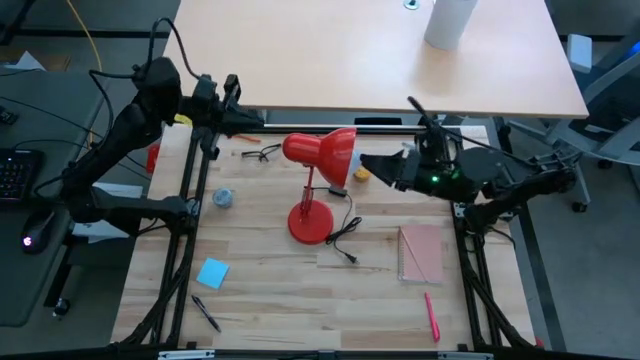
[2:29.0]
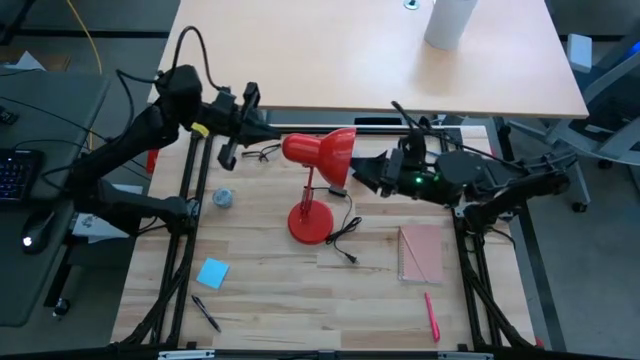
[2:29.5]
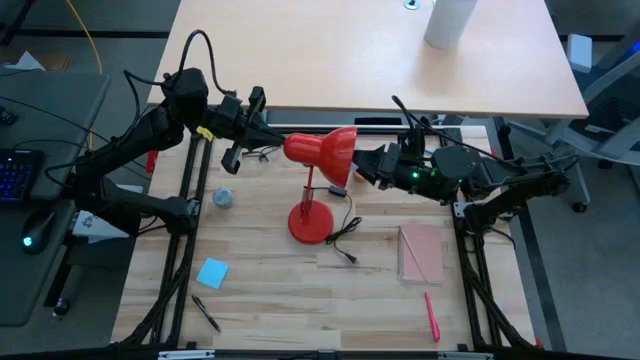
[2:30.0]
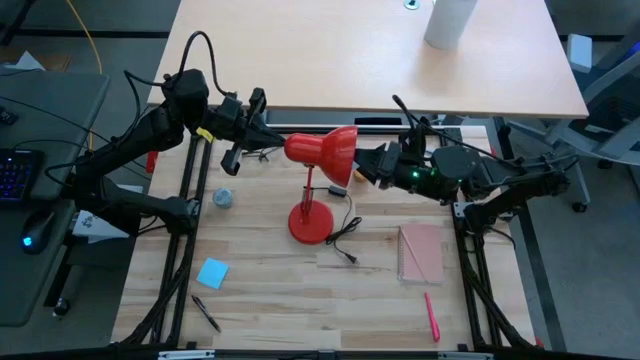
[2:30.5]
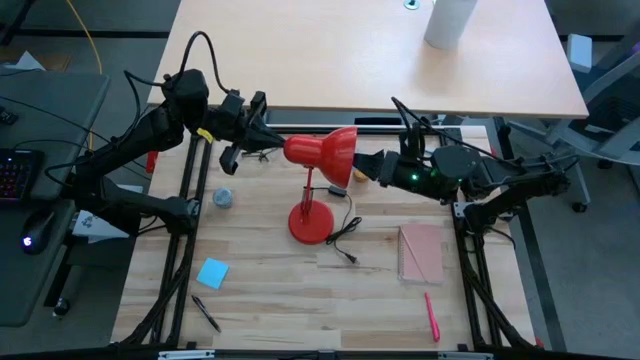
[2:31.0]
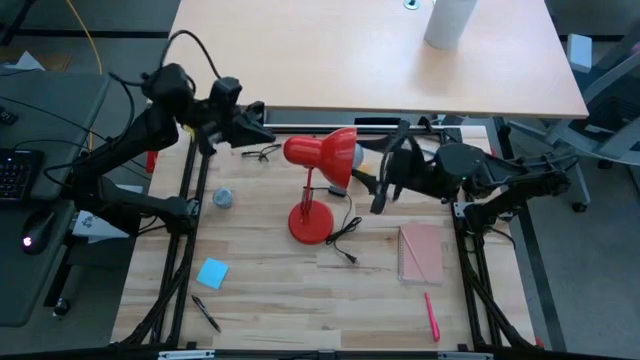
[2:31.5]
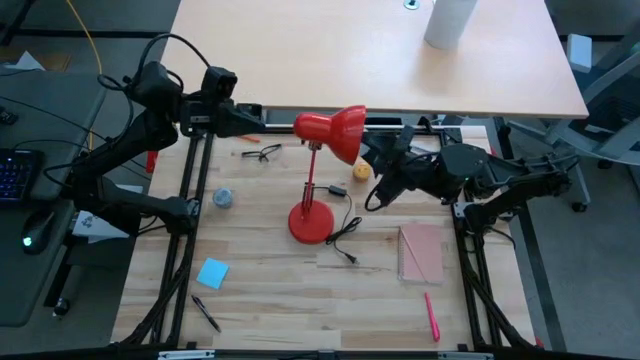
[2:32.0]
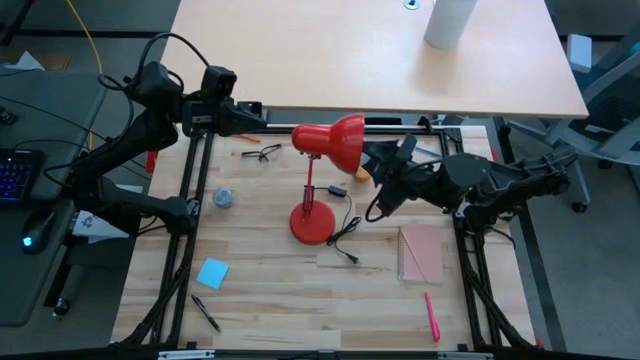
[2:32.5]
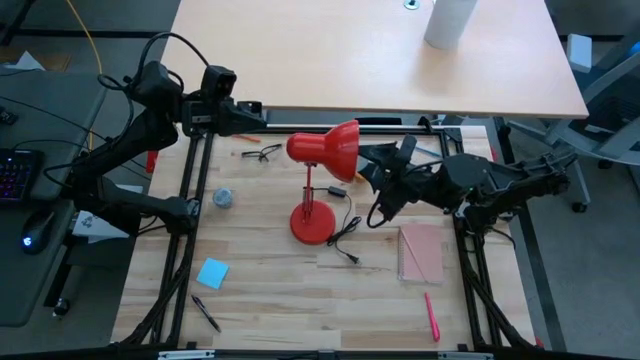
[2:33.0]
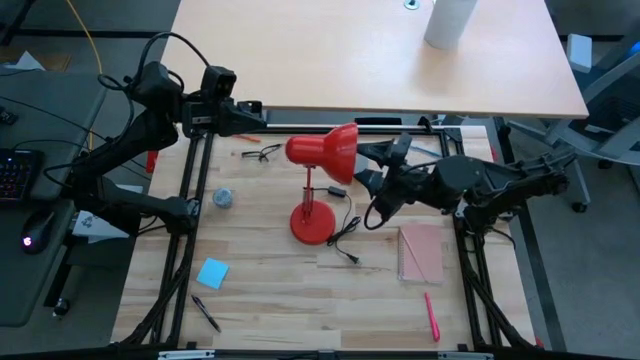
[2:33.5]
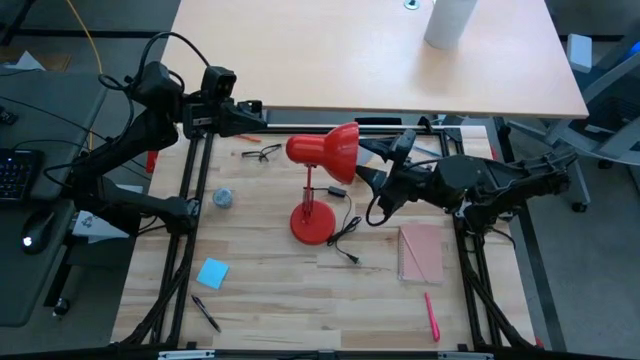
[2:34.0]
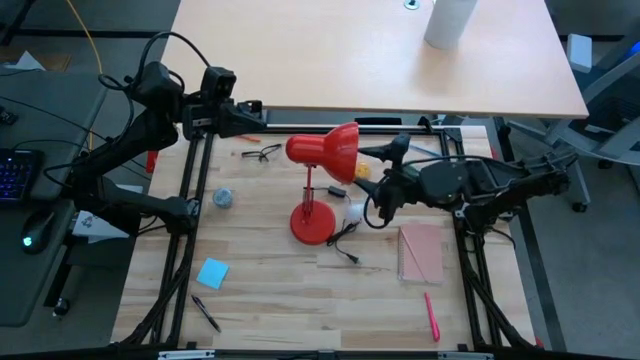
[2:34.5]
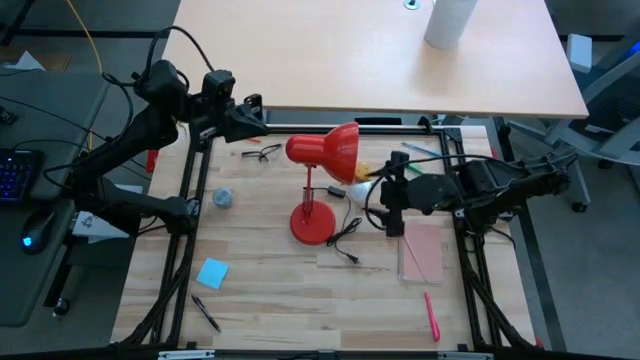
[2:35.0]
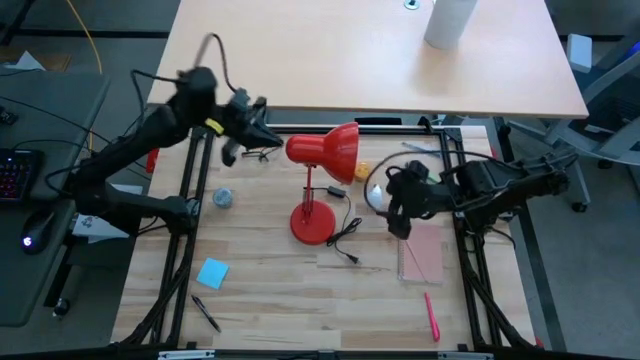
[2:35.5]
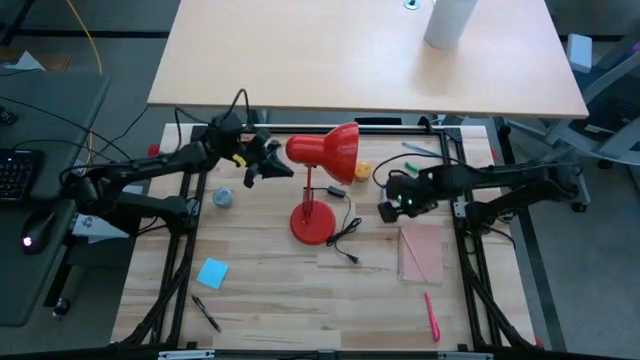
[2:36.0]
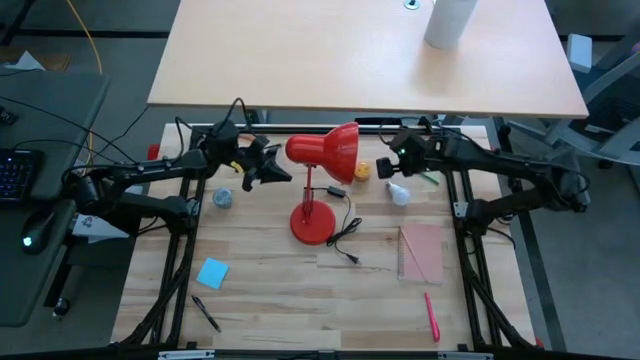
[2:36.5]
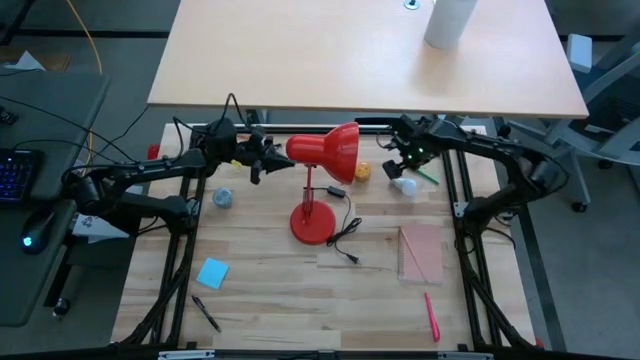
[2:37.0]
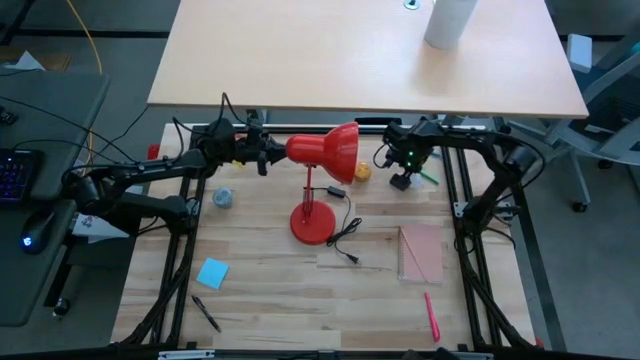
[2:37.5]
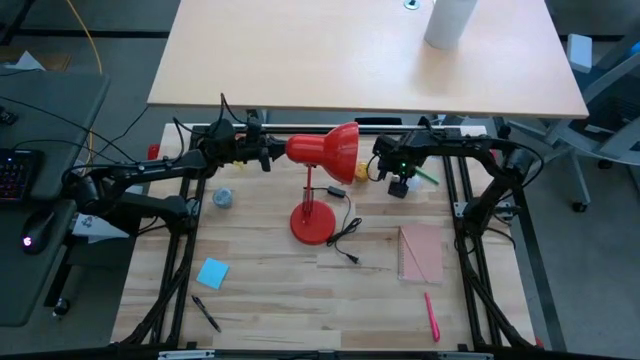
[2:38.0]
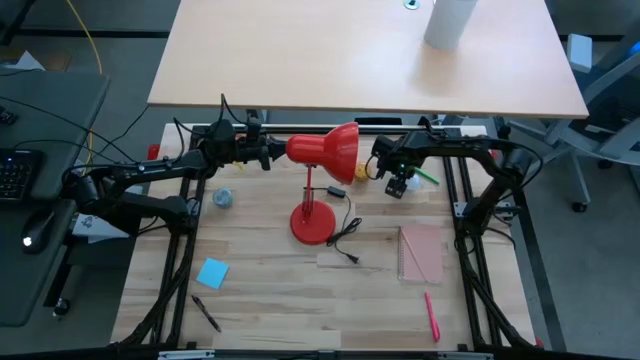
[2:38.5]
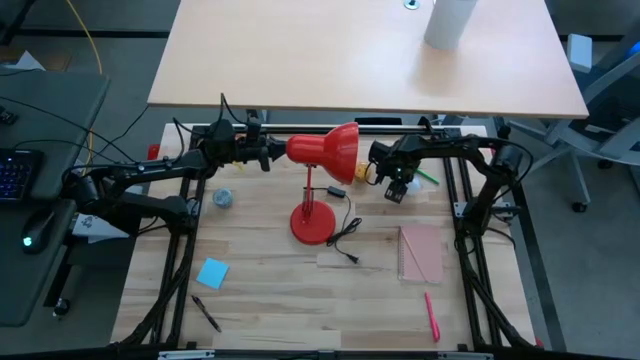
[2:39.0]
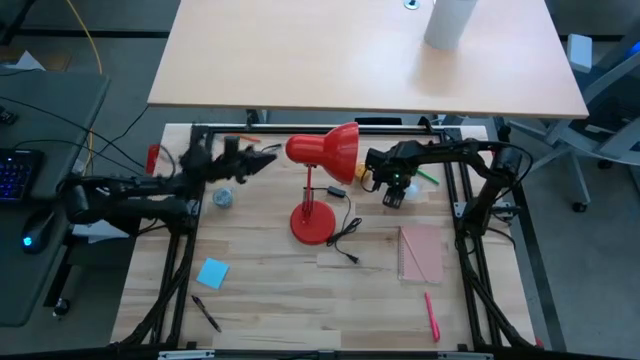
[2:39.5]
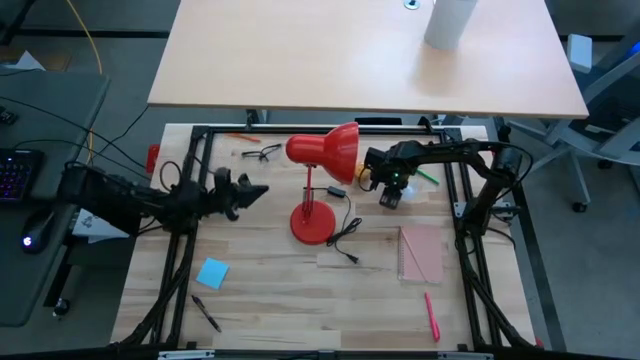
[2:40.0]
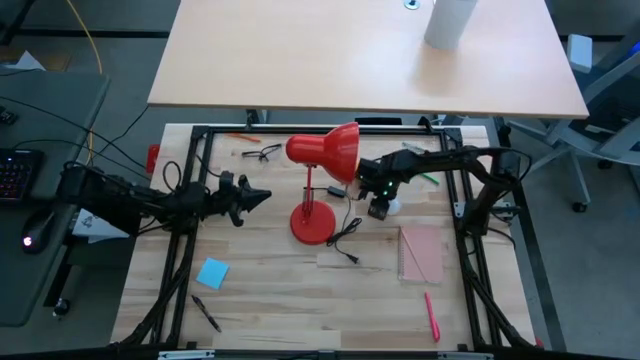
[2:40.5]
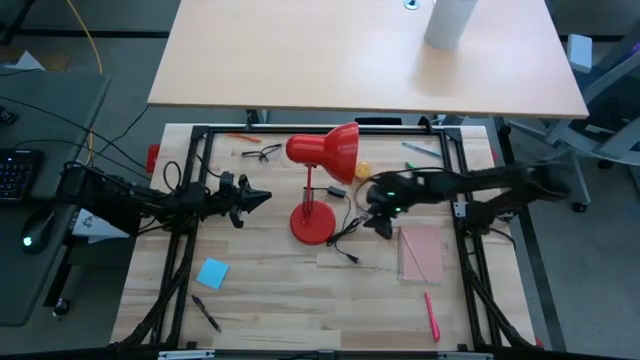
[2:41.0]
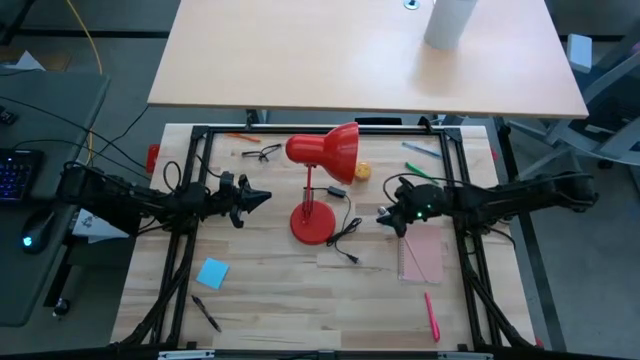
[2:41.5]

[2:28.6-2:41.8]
Task: Screw lightbulb
Remove the lightbulb into the lamp

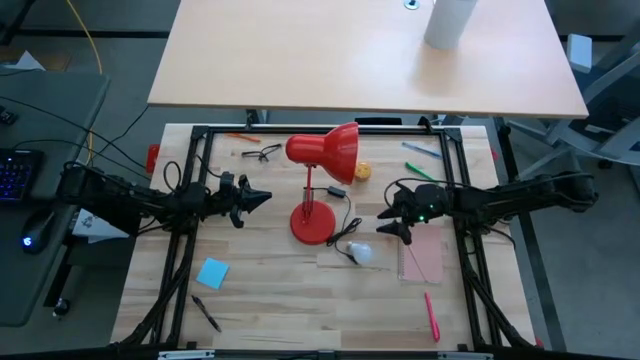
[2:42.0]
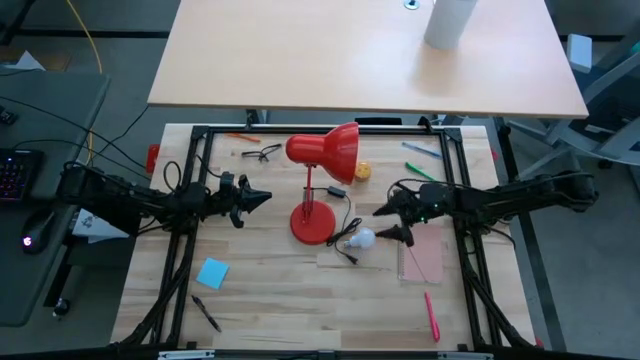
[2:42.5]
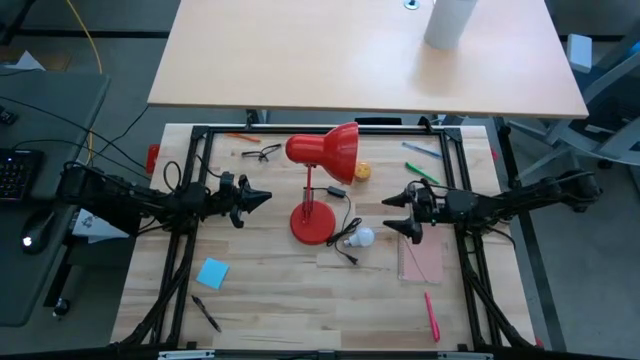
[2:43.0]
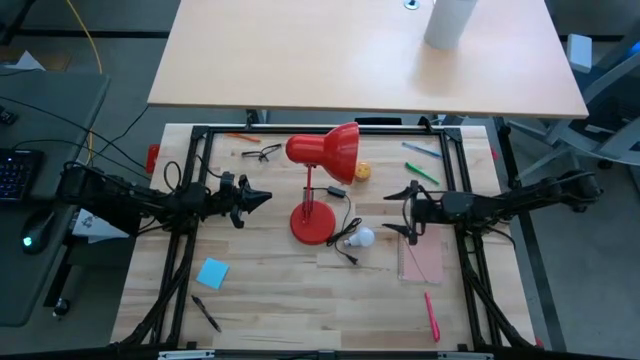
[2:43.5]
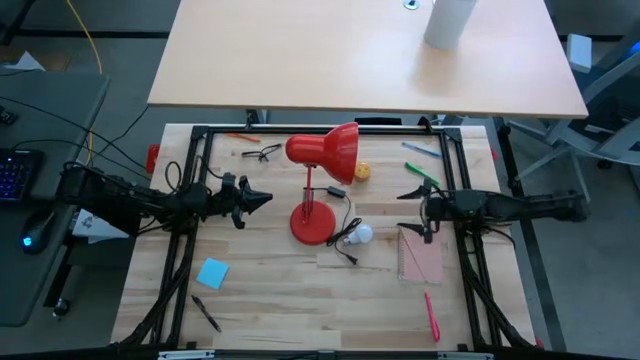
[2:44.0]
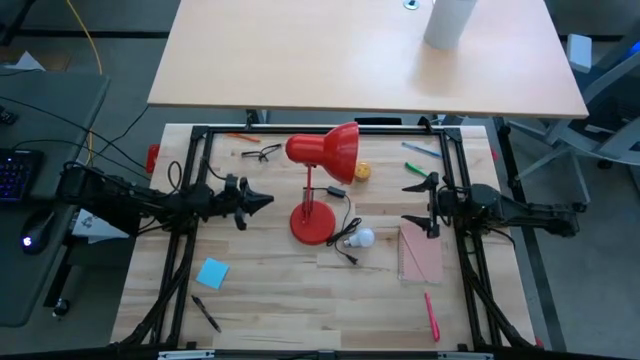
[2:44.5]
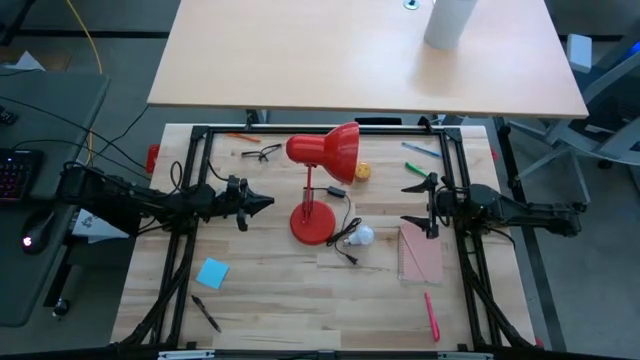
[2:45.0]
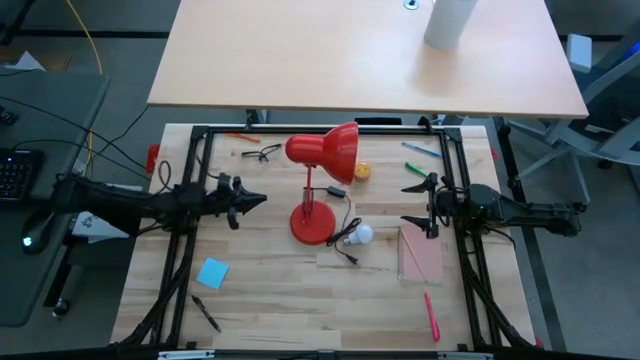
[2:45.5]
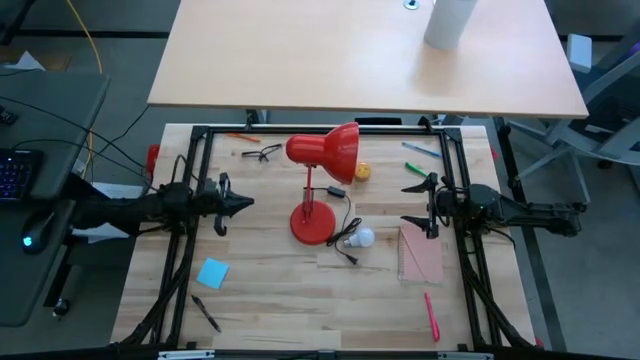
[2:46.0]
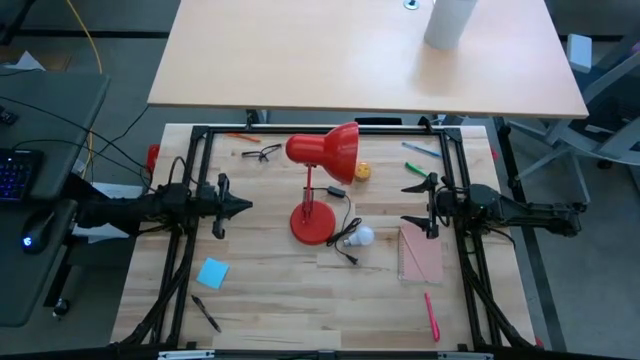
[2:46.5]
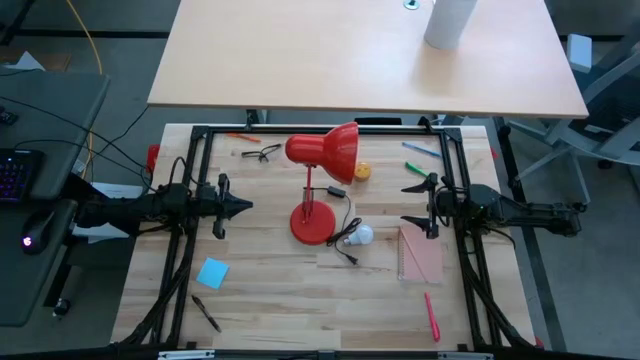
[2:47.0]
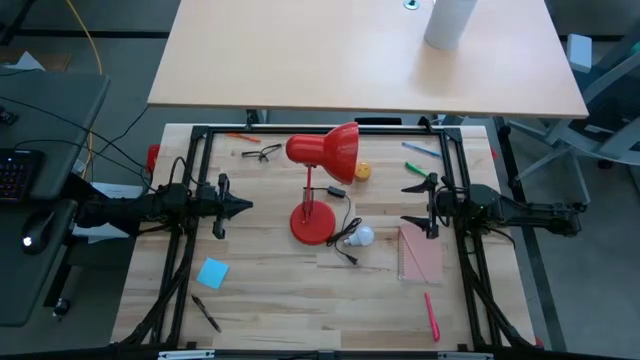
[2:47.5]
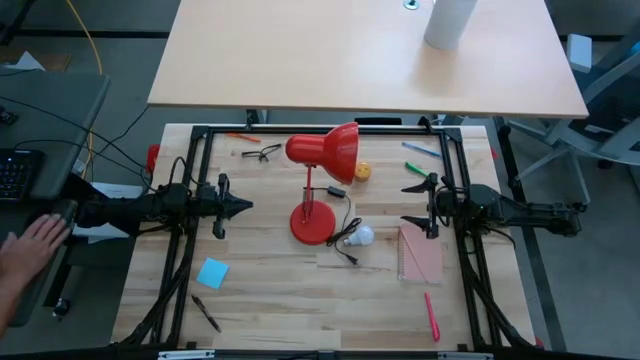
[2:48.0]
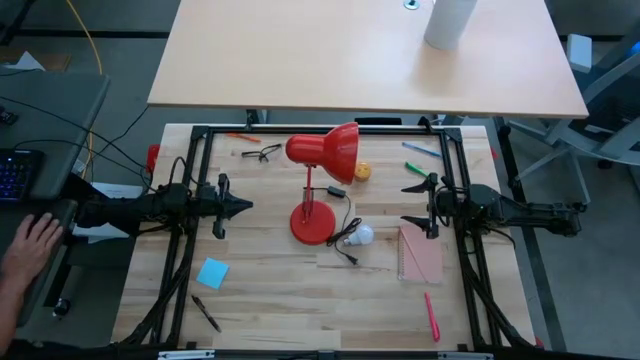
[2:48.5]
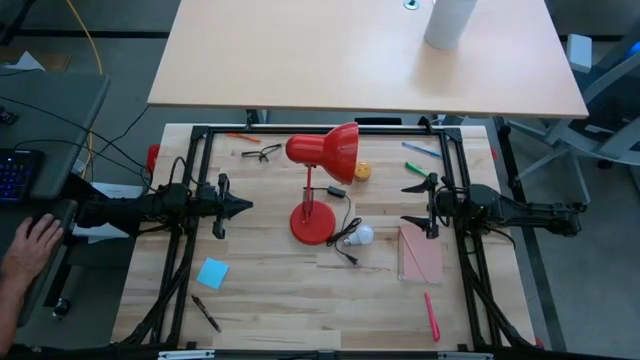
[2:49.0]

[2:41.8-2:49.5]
Return to Home Position
